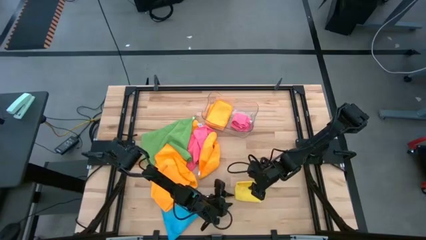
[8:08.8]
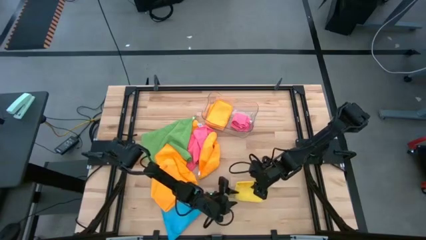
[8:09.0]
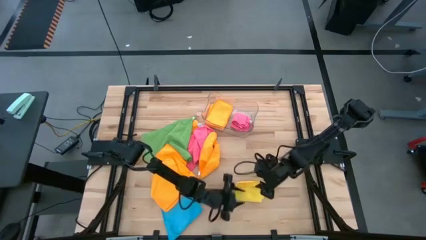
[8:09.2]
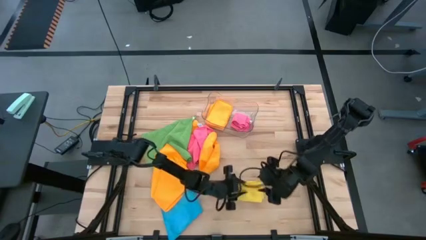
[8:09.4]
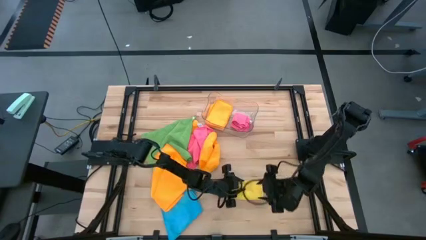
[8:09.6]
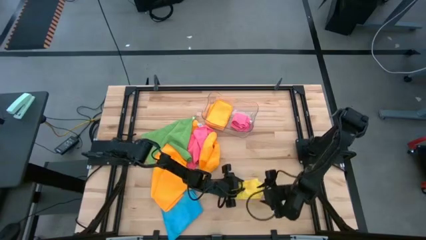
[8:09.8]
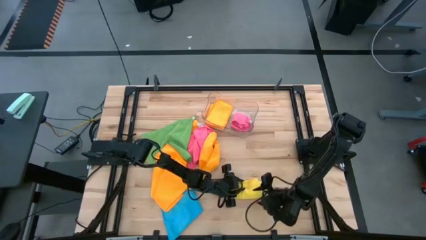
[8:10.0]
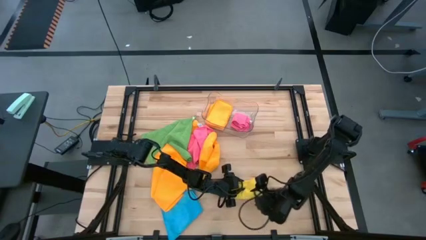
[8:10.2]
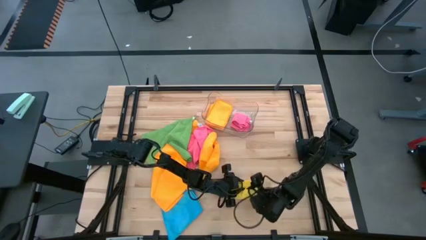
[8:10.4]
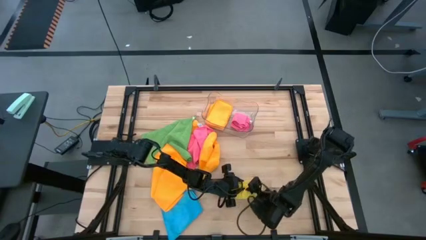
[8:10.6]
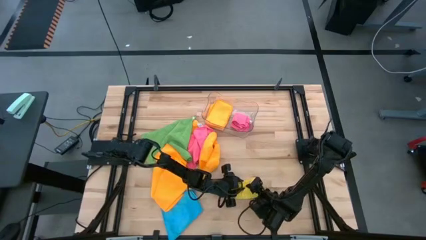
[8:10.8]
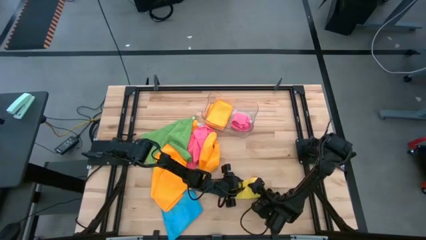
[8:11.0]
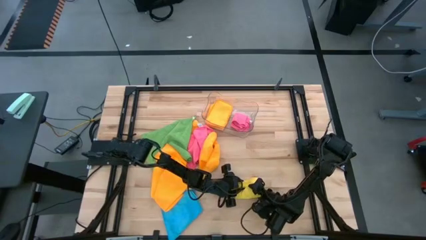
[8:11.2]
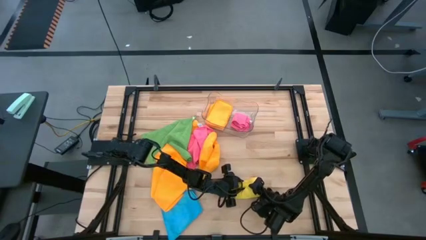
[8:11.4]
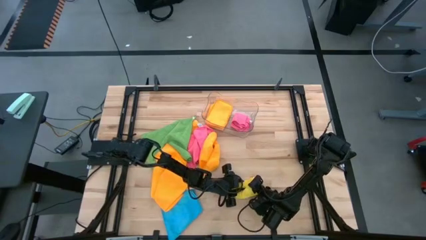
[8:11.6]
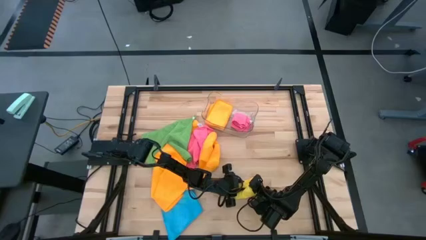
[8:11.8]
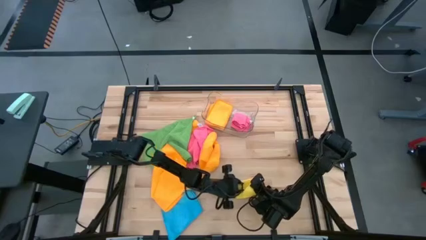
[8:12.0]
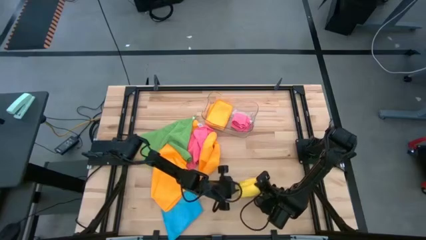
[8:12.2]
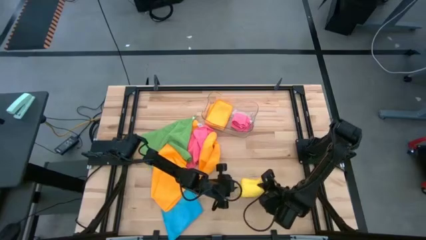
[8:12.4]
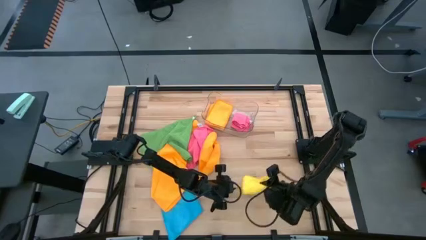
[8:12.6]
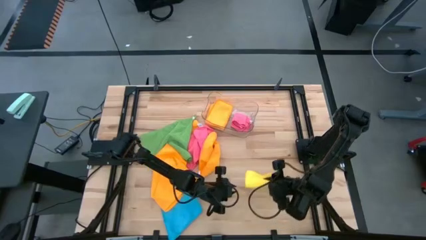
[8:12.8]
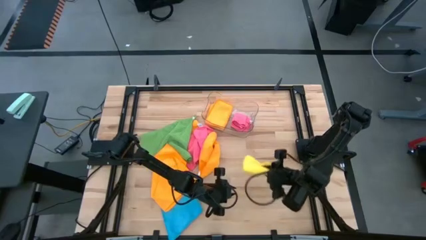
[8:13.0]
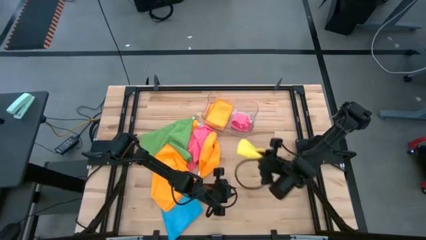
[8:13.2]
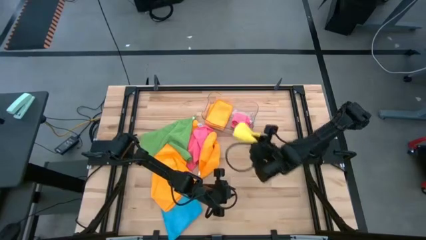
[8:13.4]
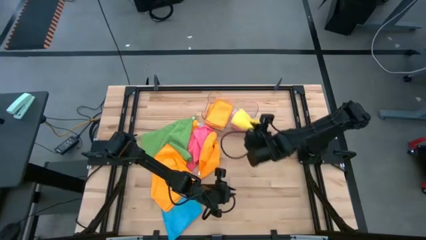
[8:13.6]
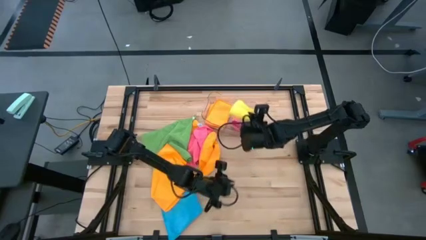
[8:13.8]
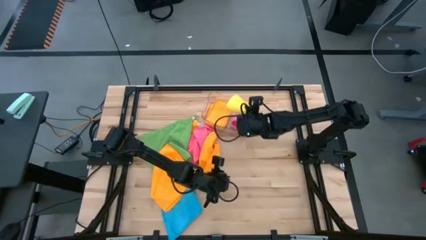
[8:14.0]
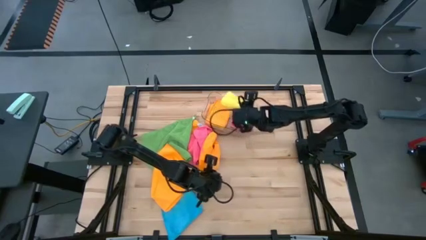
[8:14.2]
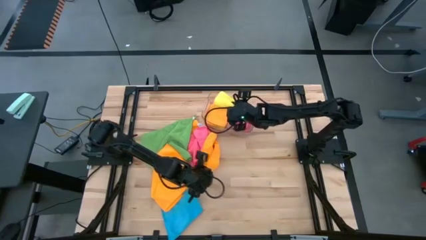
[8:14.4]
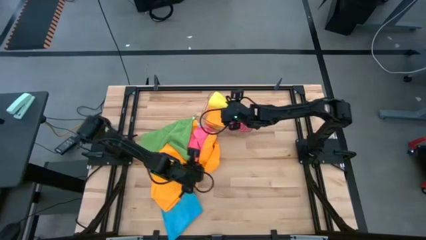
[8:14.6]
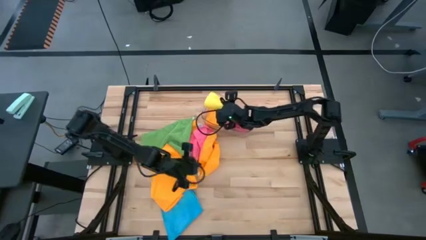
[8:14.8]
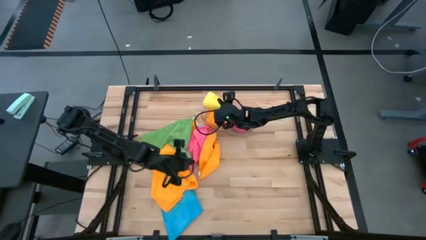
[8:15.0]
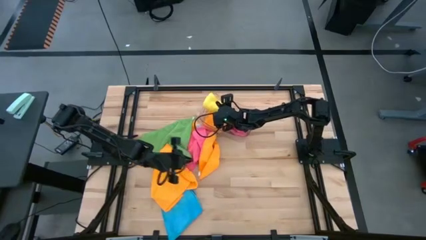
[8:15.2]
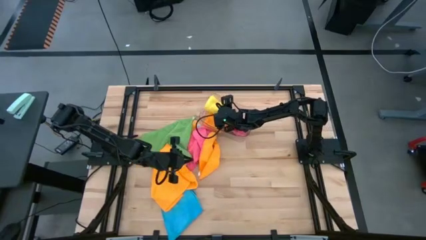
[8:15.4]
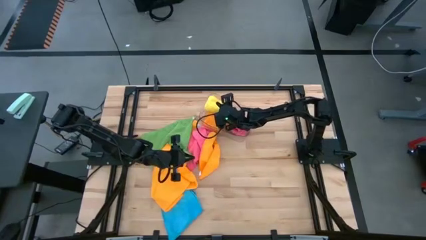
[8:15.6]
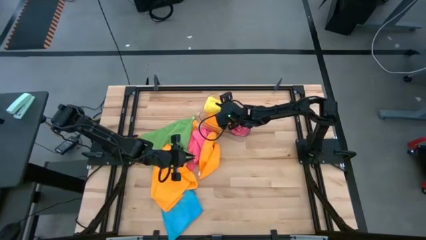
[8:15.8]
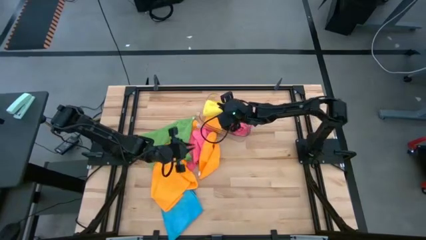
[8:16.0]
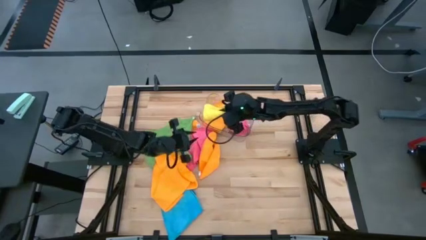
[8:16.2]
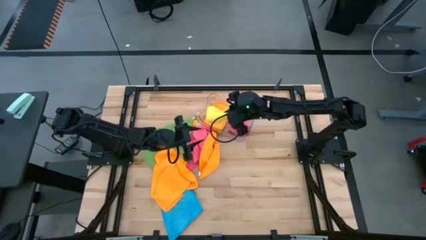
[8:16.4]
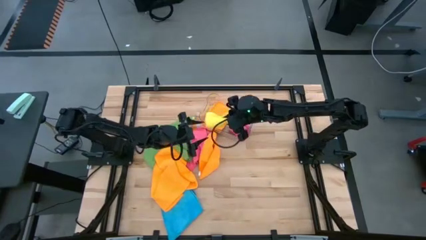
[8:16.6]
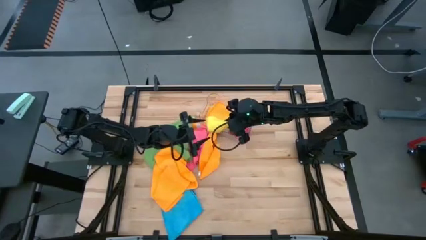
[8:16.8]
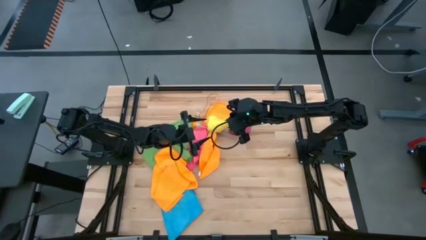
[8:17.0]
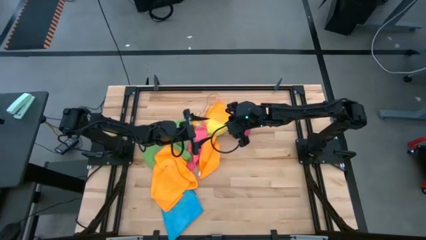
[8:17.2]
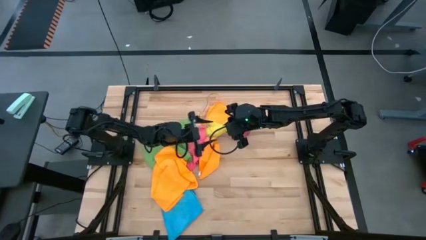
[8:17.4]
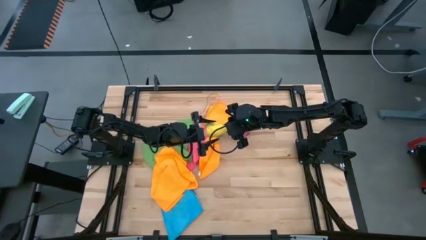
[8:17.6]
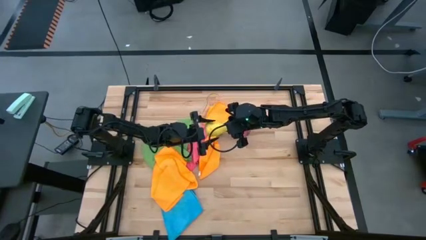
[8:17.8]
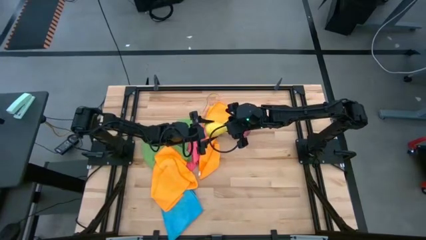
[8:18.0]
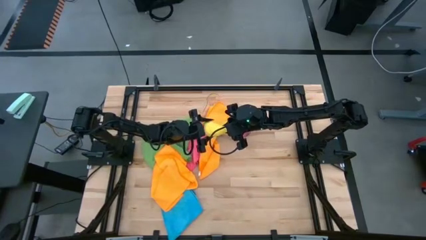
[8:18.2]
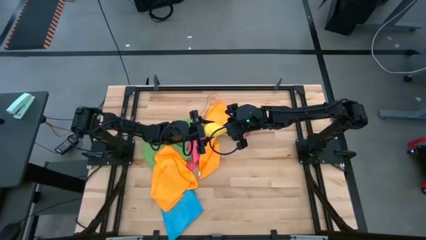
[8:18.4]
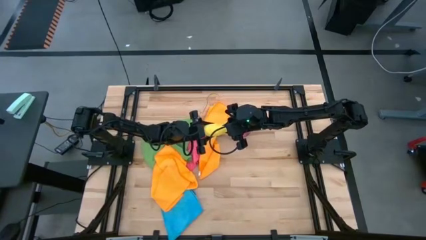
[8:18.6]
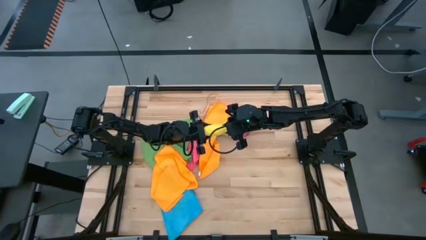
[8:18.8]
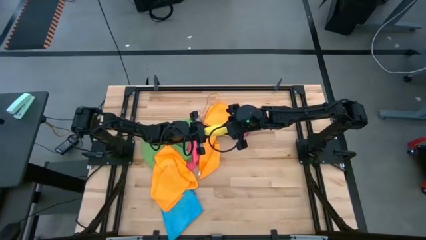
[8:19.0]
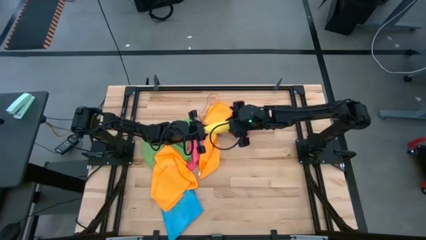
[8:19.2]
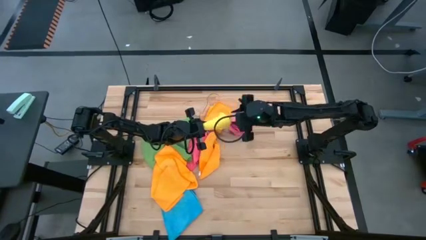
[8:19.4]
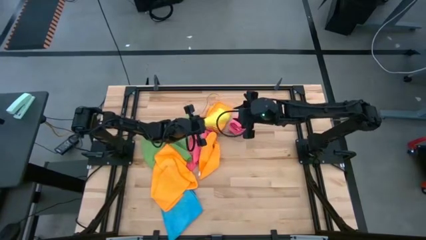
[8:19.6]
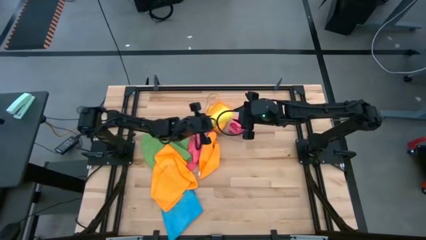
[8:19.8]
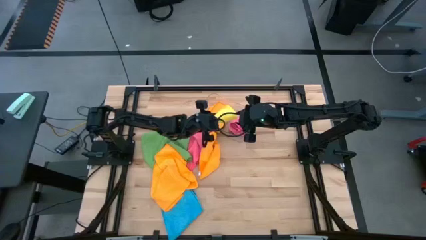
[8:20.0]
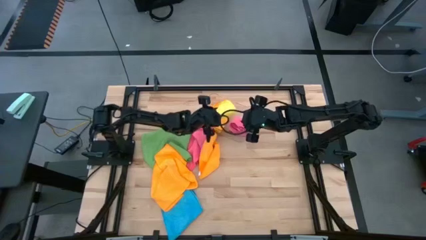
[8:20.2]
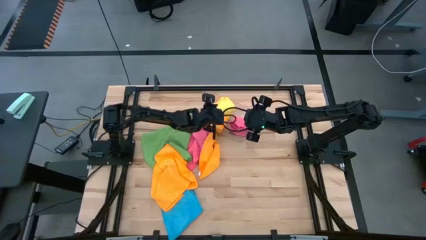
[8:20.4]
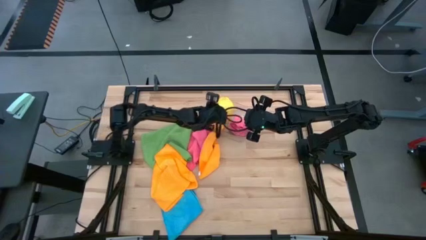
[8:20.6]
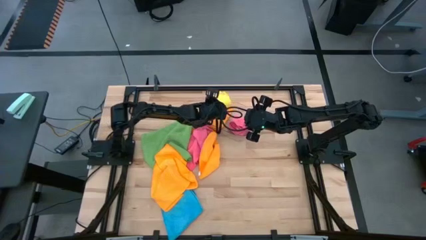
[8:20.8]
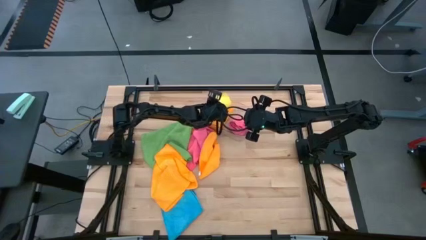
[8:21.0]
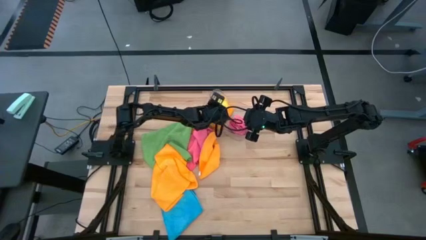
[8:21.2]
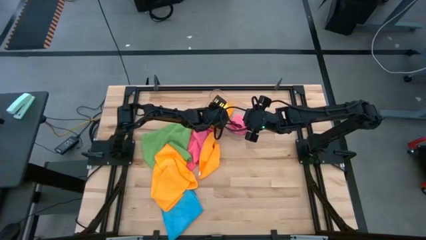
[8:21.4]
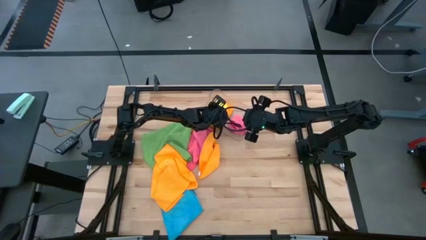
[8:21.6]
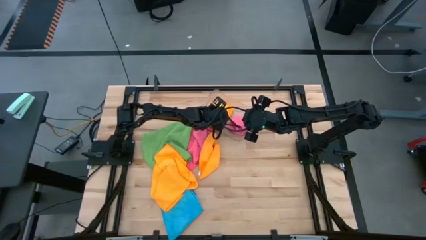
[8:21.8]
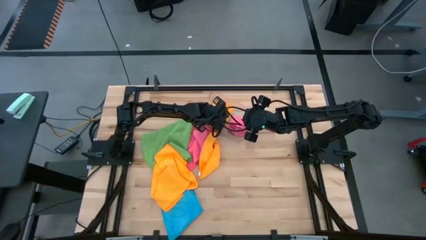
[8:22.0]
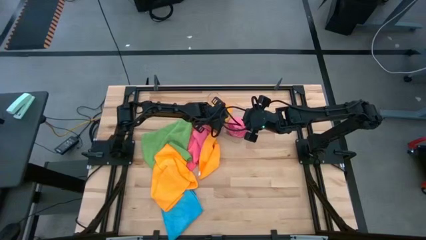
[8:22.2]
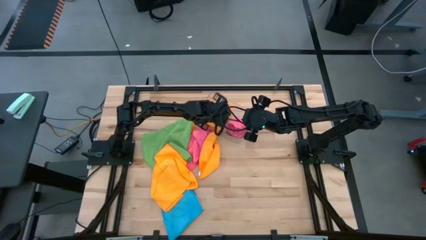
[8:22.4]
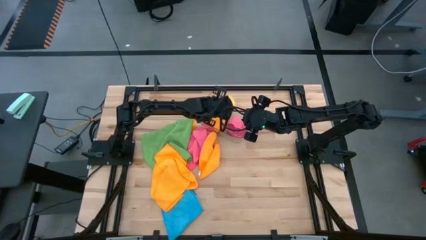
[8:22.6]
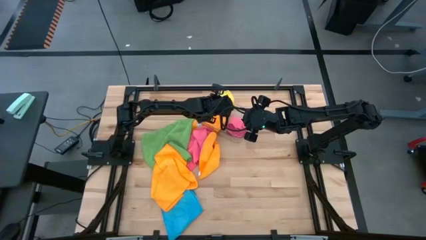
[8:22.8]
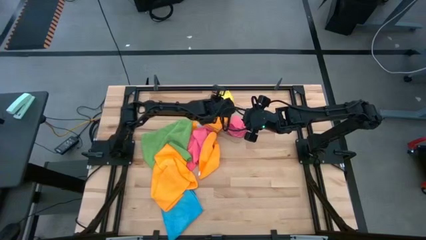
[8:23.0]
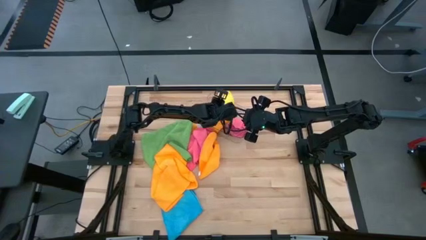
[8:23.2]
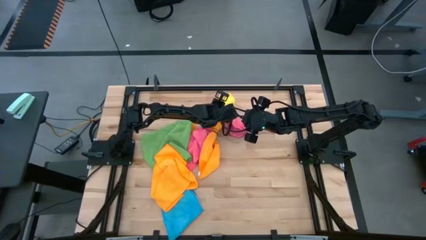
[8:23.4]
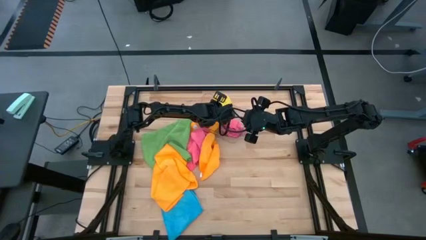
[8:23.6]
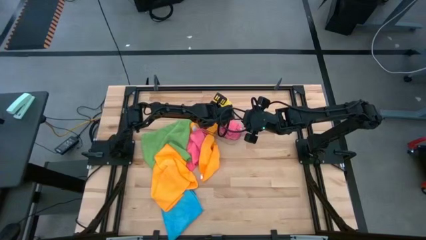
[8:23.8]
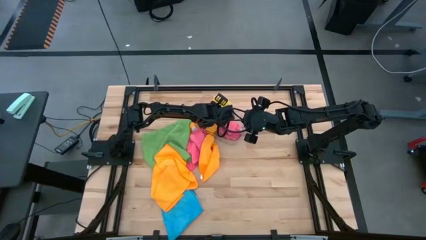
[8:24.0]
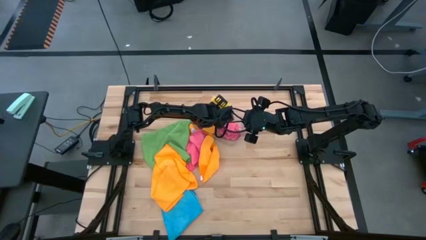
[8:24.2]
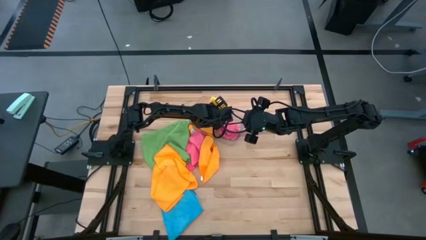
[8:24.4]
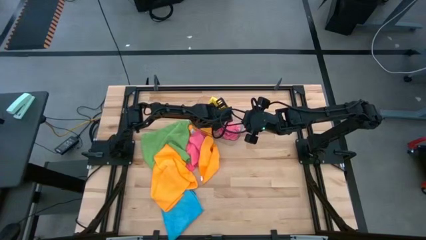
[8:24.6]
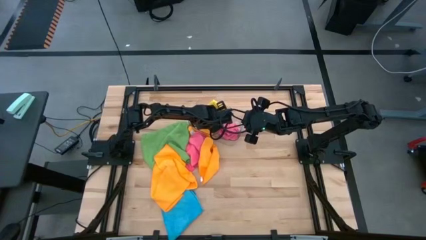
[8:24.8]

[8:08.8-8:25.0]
Task: Fold microfiber towels
Put the yellow microfiber cloth into the transparent bin
